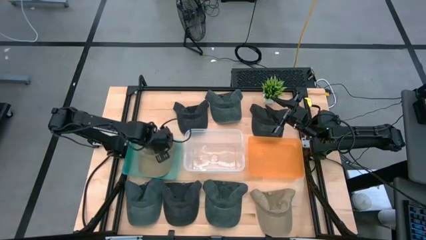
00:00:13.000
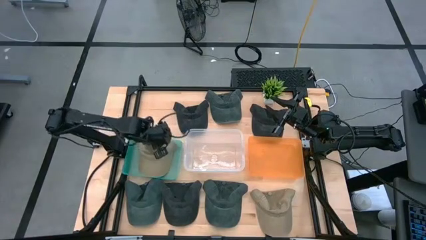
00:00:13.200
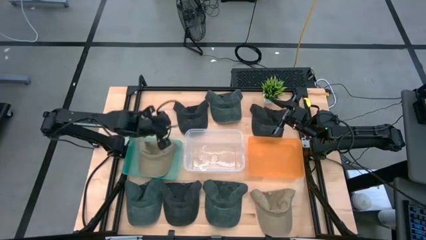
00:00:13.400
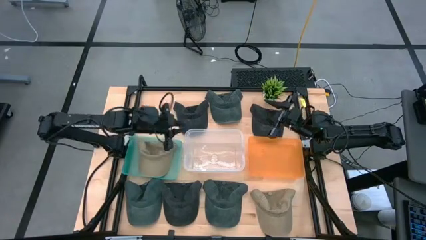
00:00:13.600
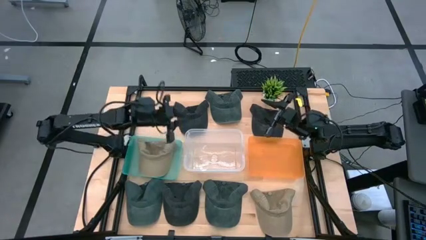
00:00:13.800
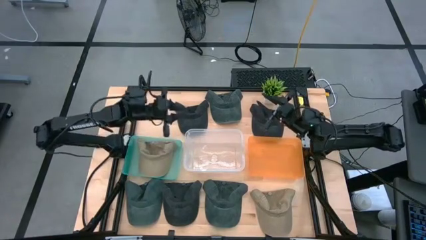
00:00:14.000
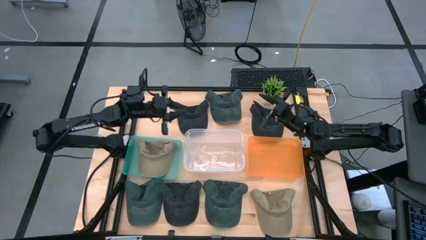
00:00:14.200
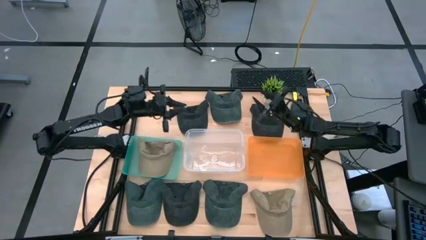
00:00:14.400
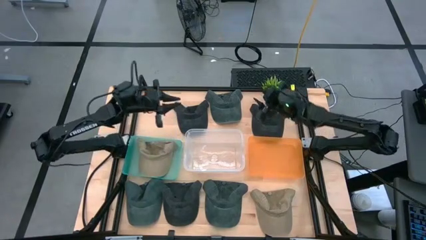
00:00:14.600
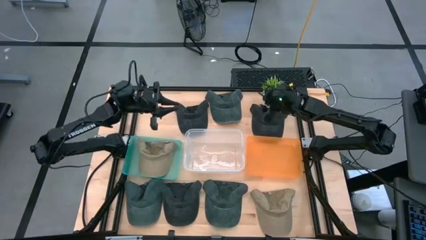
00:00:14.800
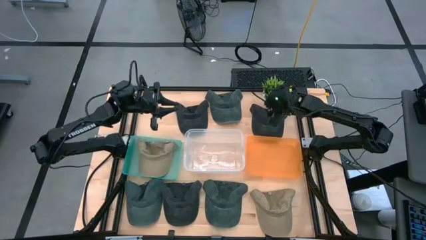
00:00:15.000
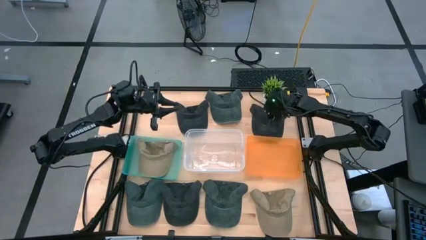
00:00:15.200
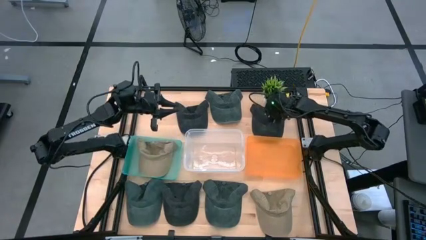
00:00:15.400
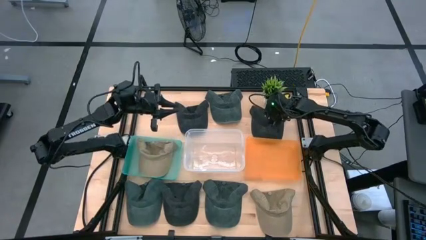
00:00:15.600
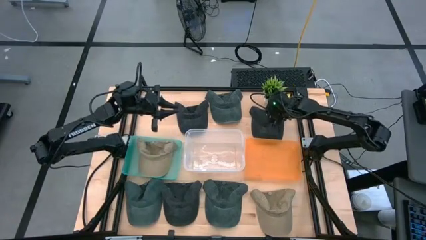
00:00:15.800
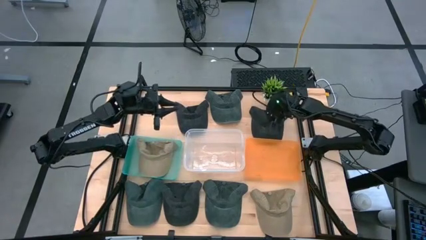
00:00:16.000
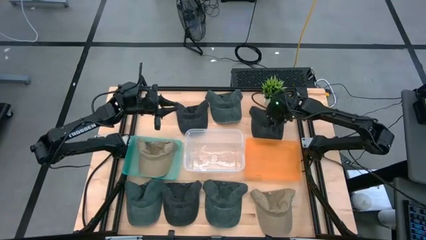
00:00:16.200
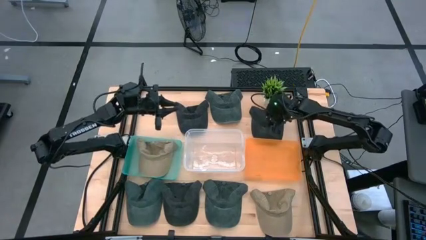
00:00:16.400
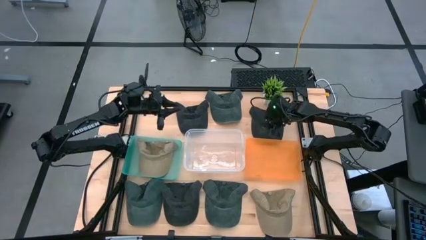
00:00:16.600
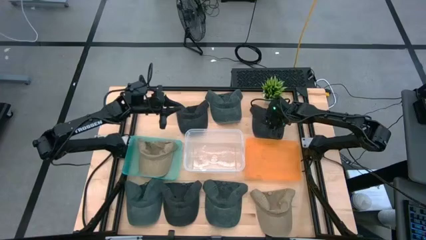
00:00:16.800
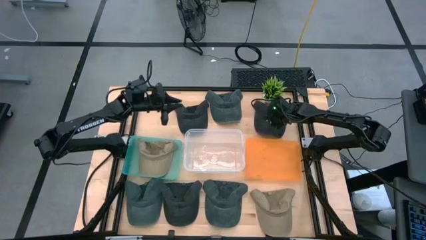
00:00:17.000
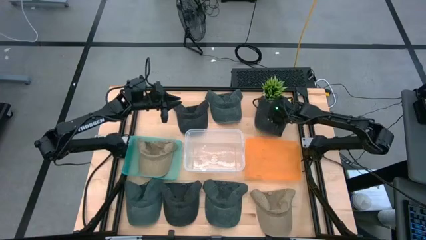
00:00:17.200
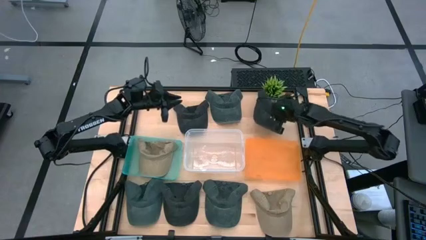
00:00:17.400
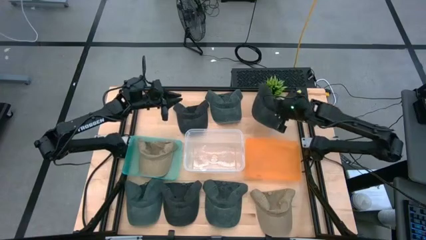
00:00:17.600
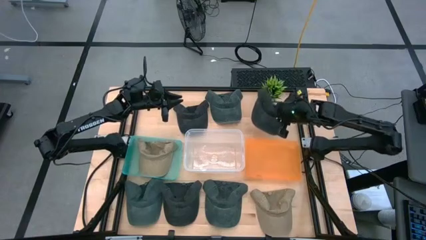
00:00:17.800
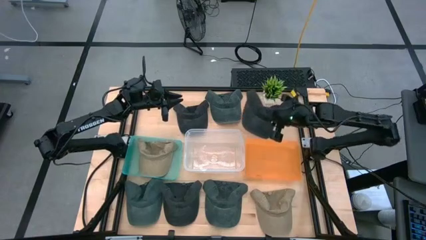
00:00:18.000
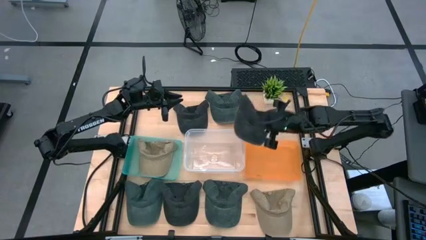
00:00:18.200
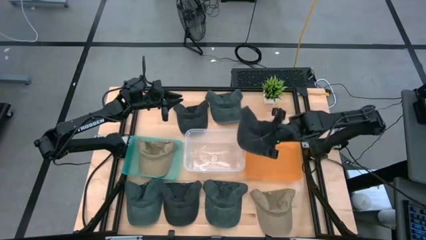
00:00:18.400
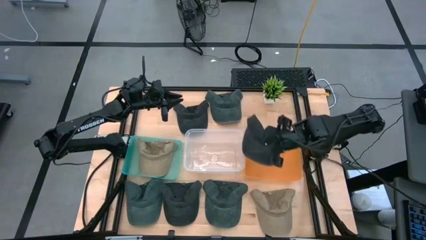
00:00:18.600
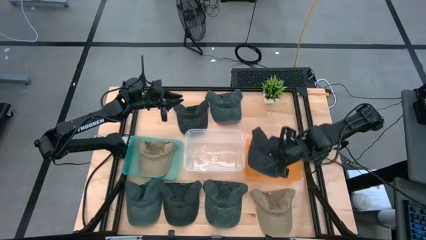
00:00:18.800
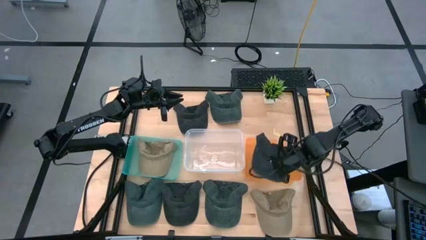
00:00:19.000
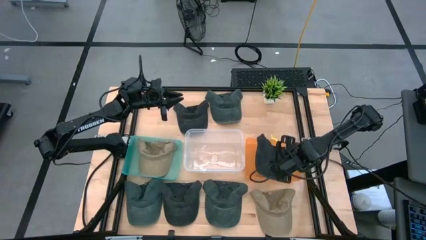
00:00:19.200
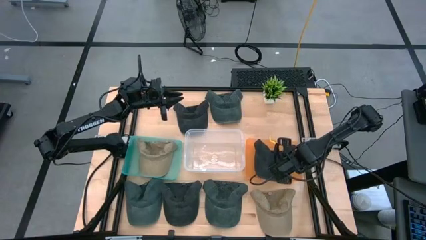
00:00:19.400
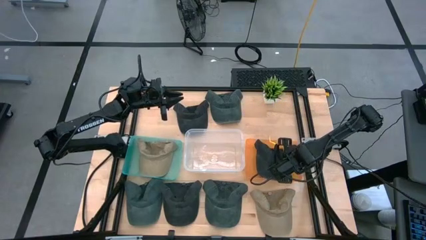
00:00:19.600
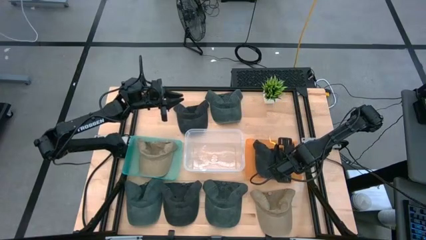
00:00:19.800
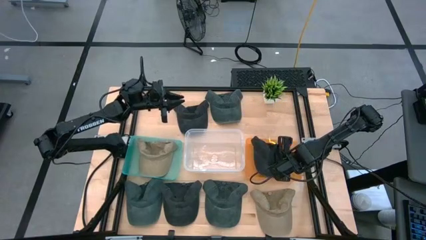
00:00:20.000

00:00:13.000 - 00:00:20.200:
Task: Pick & Place hat
Put the top right black cap into the orange bin

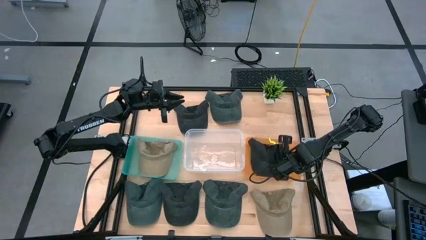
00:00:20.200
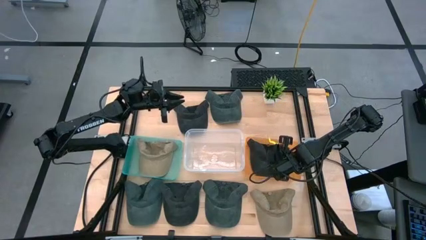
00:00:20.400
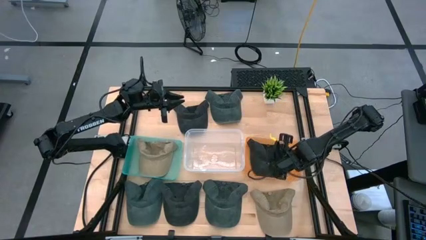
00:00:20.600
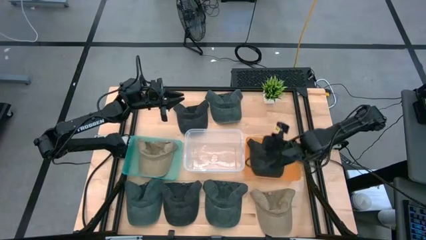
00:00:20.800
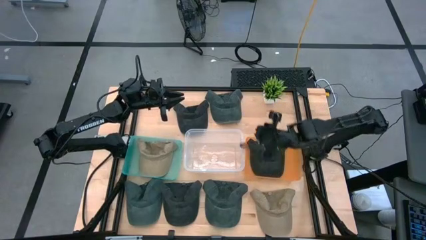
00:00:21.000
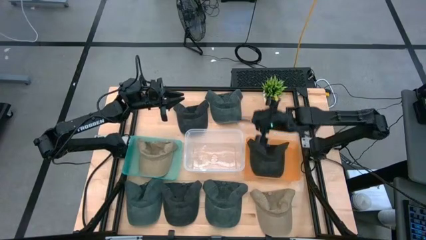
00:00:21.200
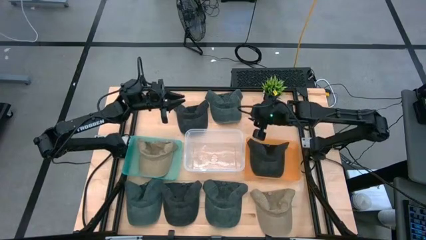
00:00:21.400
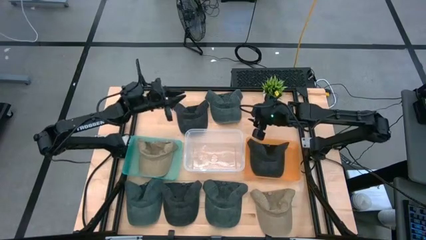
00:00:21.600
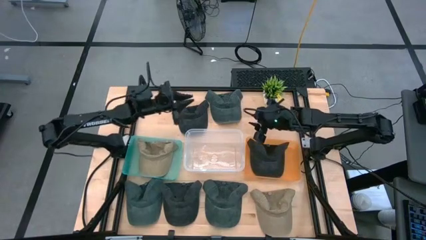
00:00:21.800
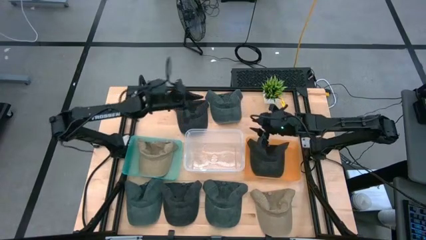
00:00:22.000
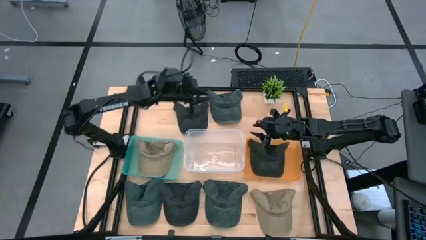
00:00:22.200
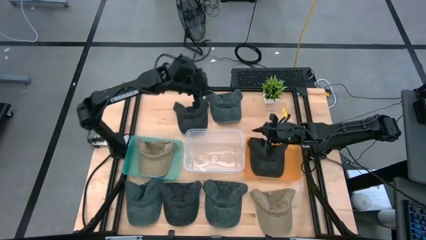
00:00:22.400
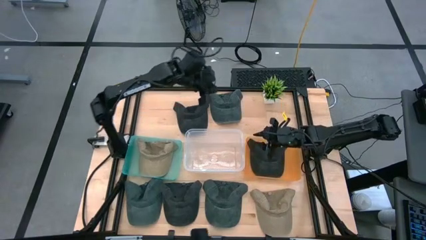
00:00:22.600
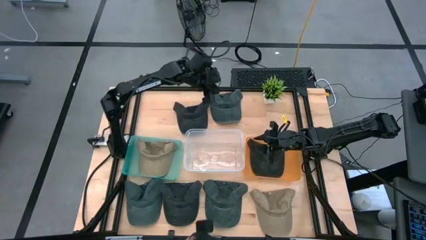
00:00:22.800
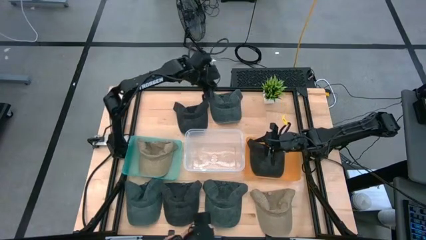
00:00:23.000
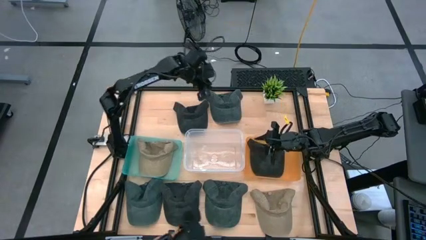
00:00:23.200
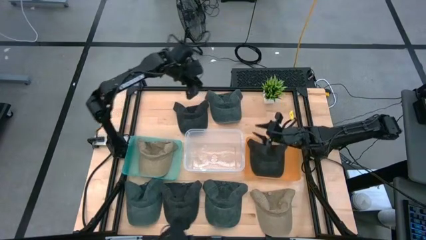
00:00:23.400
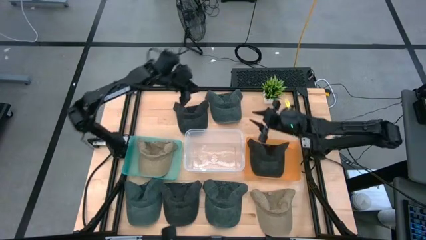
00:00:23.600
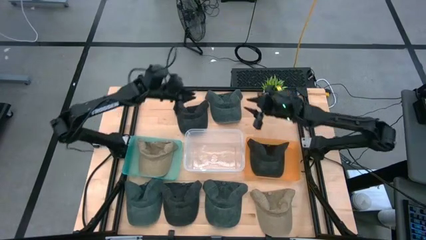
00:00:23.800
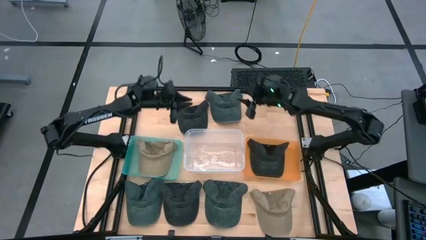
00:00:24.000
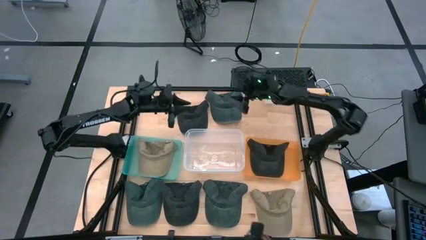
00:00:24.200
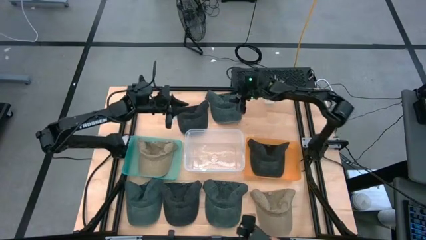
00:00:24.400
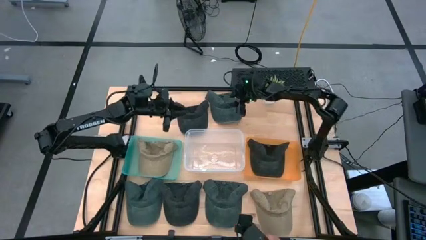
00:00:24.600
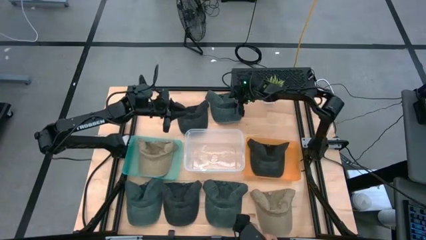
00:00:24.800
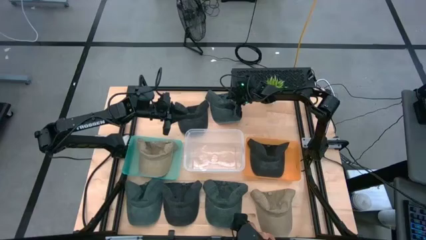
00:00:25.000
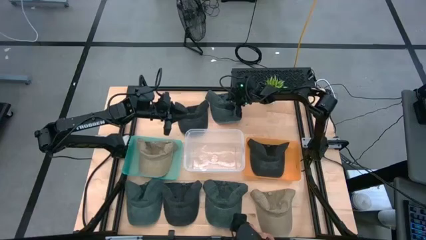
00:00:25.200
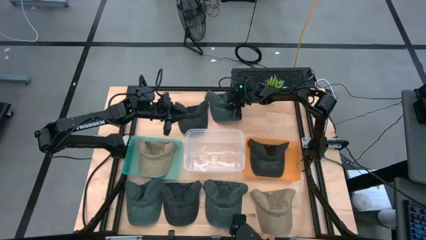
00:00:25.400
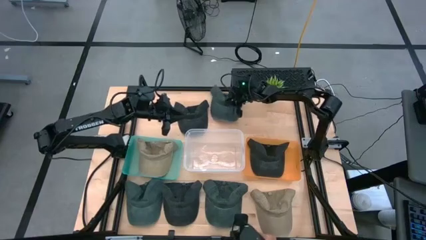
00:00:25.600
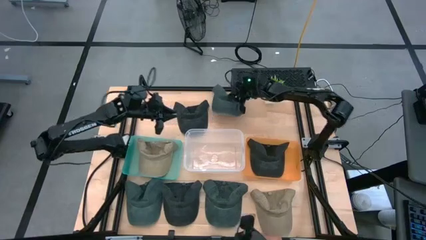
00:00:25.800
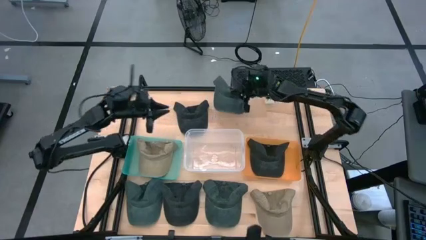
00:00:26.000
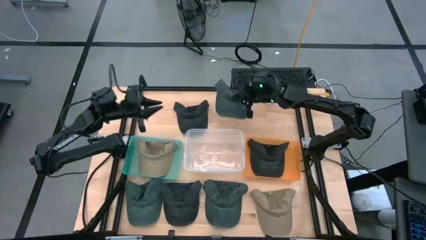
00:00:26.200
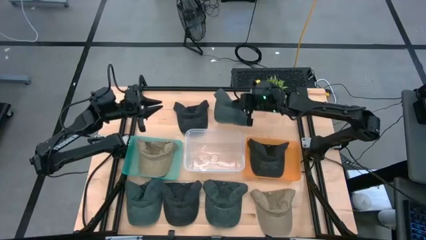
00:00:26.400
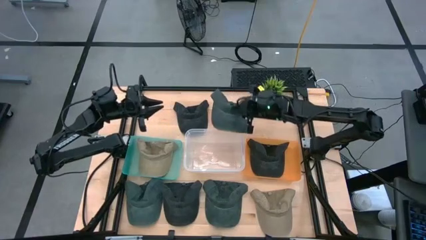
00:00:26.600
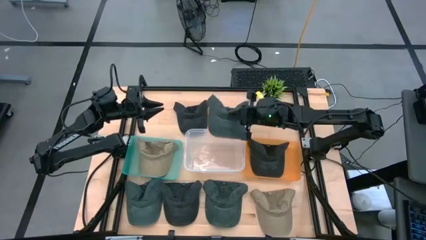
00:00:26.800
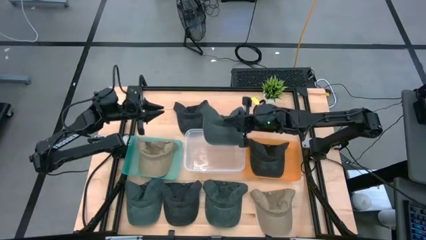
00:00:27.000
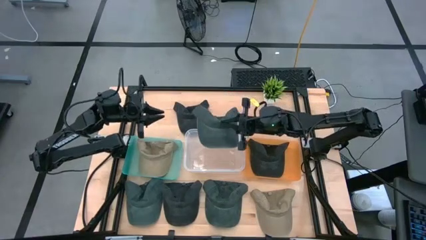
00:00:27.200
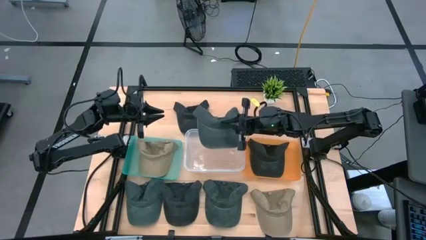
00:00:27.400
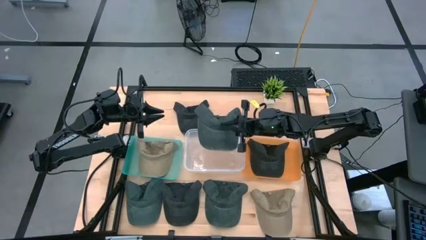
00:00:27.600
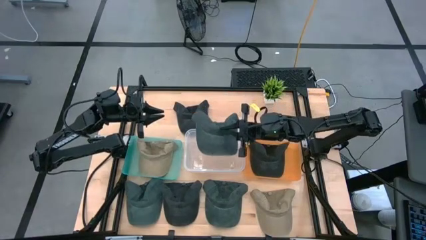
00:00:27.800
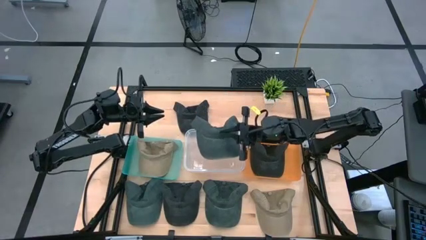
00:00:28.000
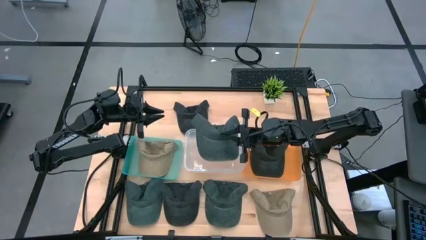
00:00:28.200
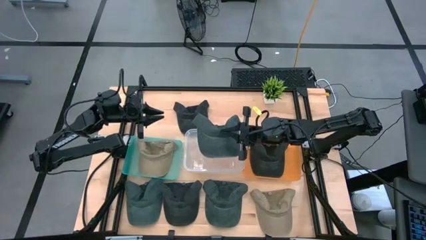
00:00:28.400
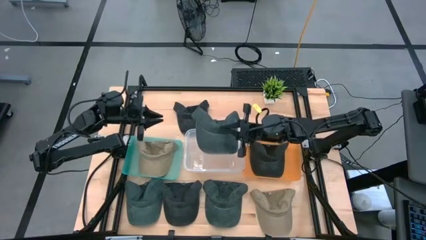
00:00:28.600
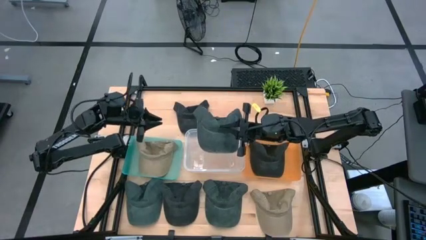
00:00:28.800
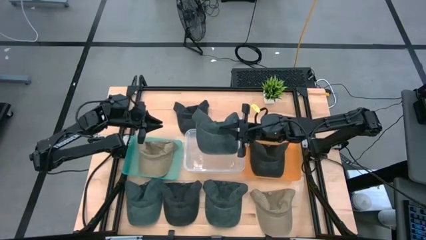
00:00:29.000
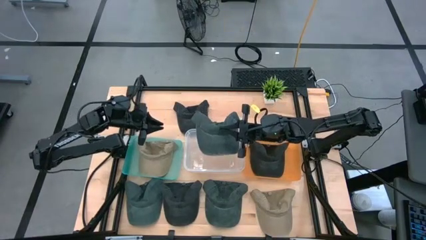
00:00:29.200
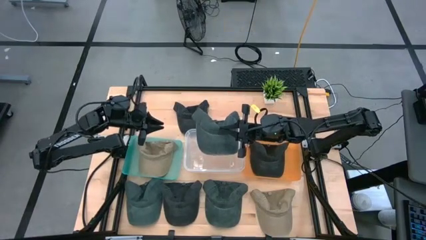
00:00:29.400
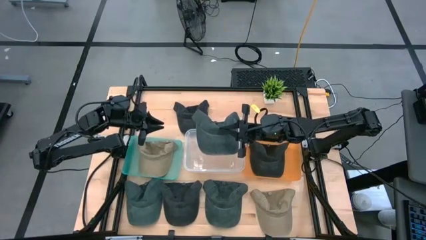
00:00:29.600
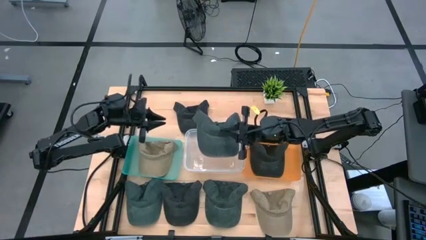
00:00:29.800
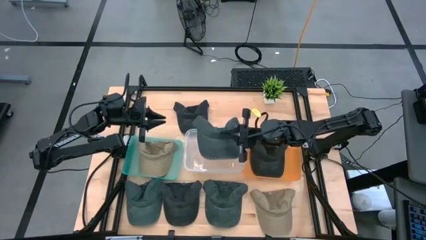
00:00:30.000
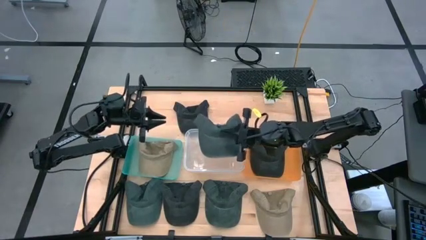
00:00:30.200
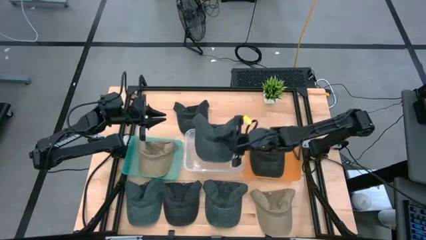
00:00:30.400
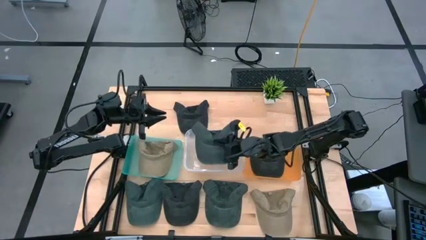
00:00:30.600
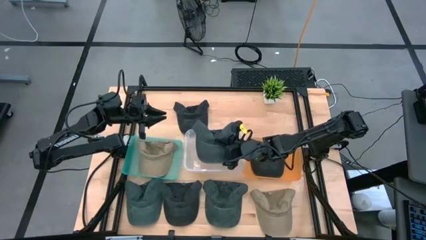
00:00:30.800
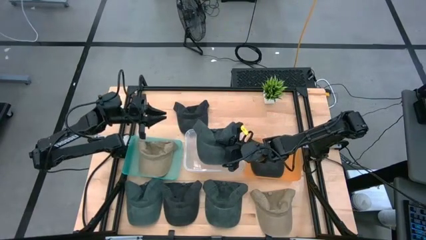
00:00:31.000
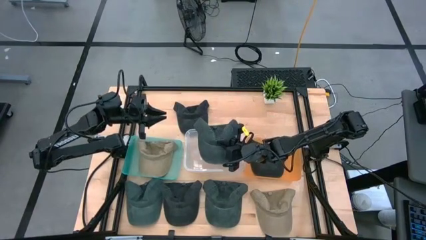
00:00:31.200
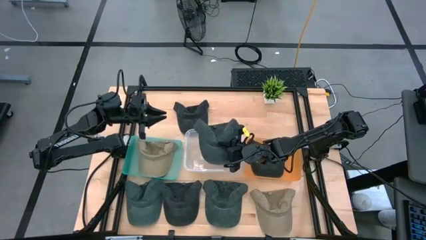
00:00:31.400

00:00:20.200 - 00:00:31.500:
Put the top right gray cap into the transparent bin
